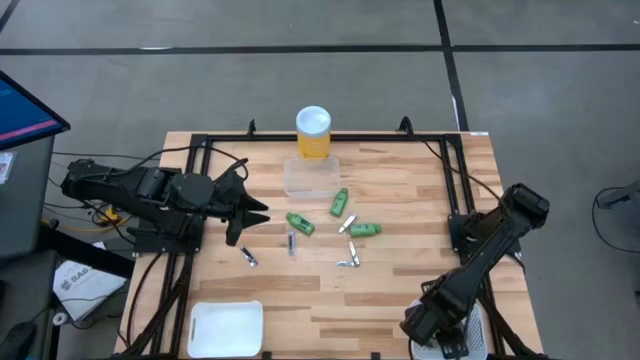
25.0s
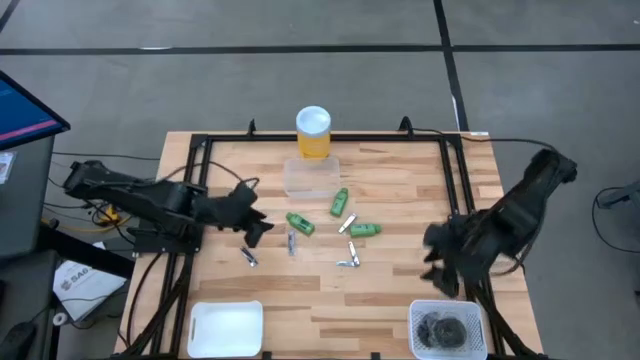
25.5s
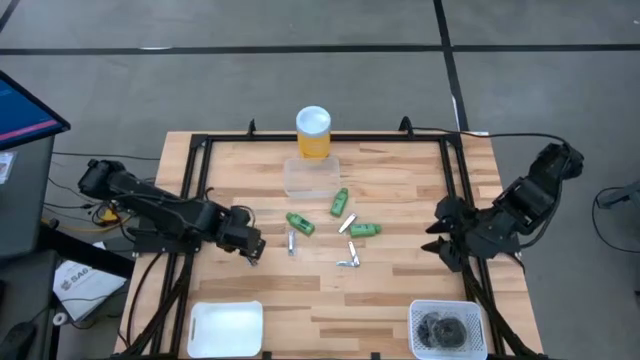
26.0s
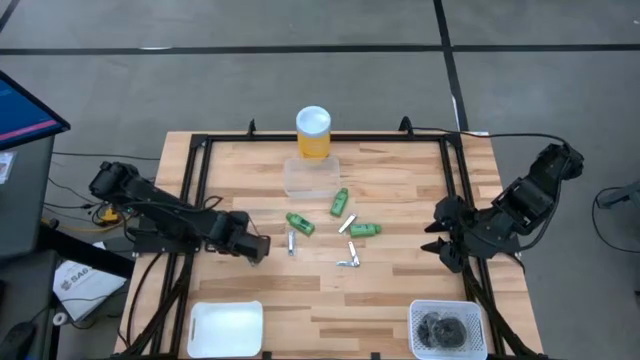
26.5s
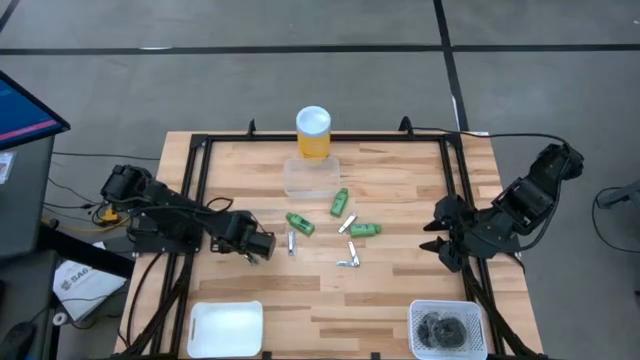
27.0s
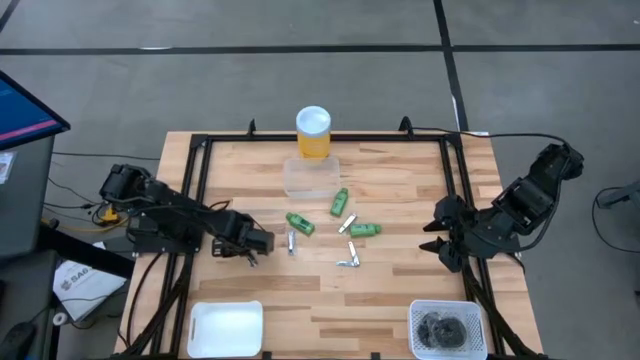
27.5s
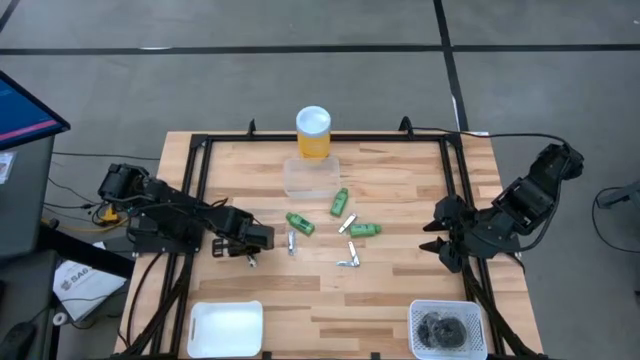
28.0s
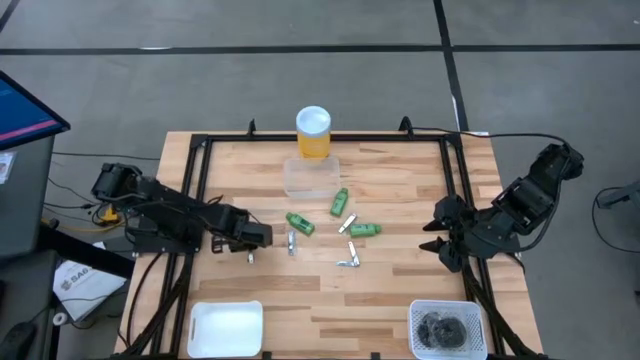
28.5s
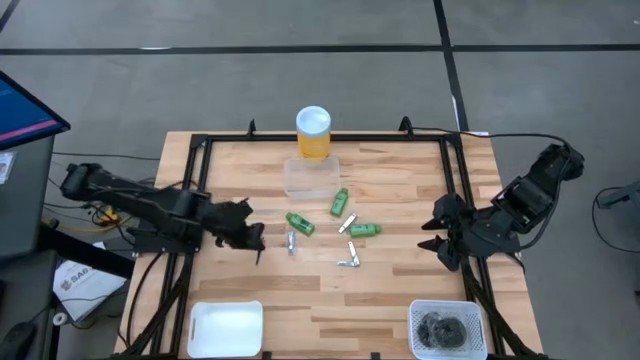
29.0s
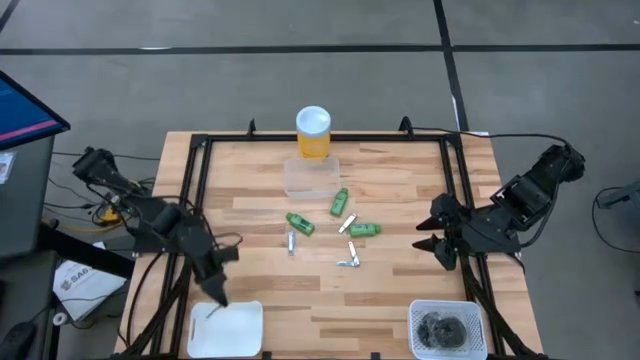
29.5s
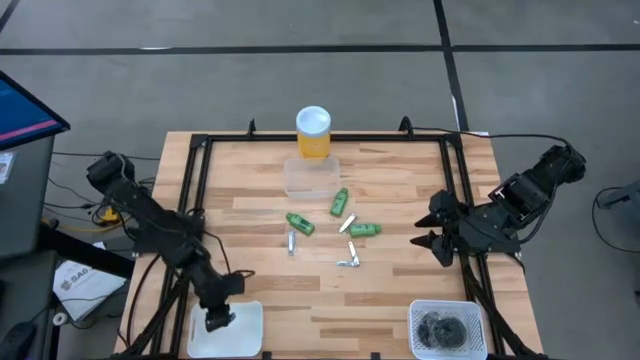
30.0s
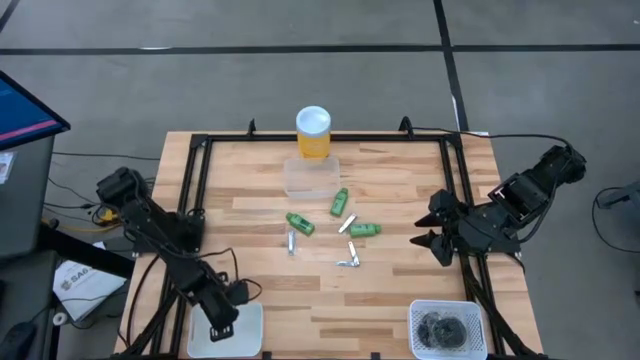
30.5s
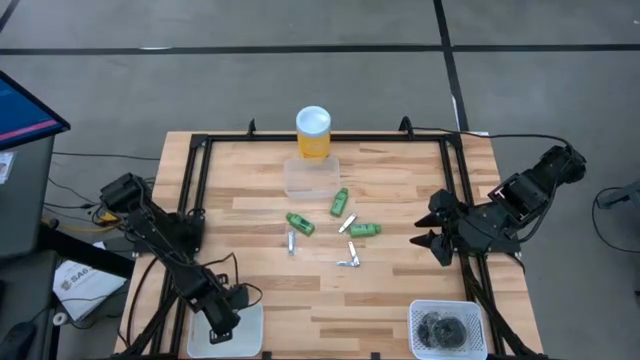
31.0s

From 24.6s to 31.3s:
Task: Pick & Place Travel size toiletries
Put the silver nail cutter into the left white bin

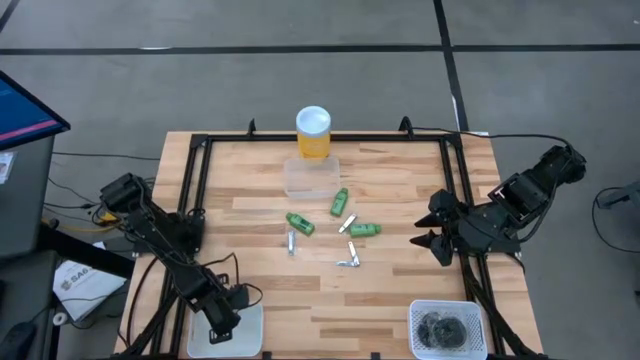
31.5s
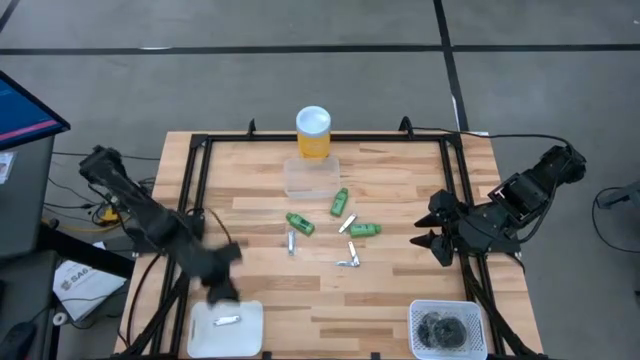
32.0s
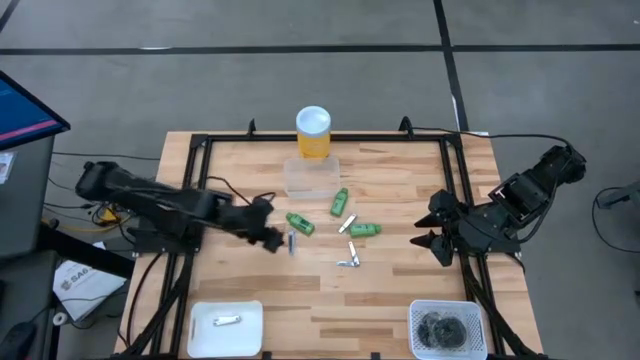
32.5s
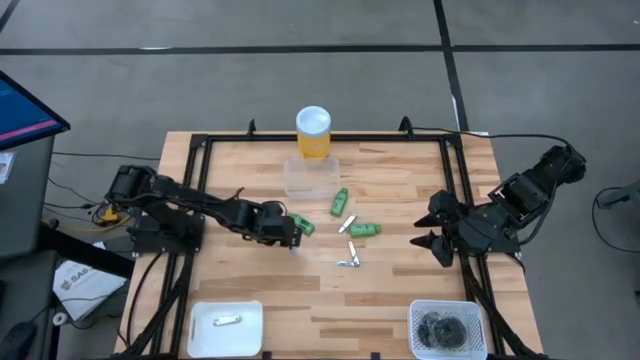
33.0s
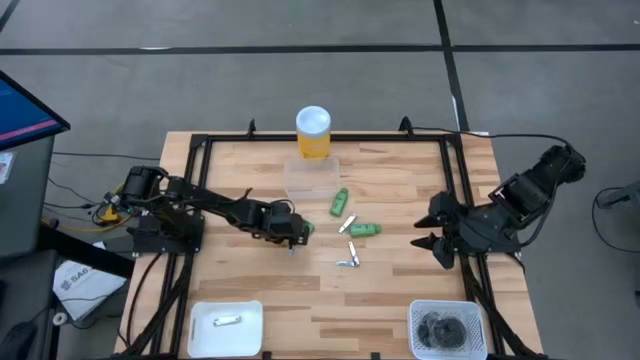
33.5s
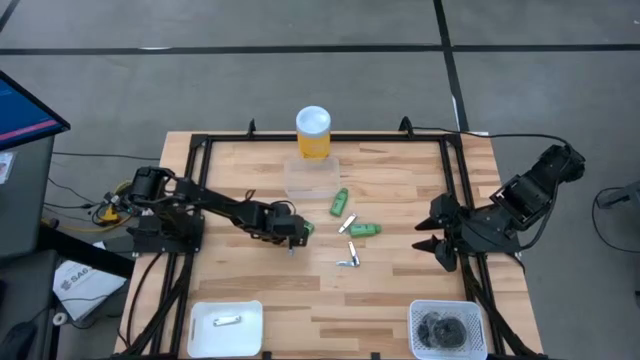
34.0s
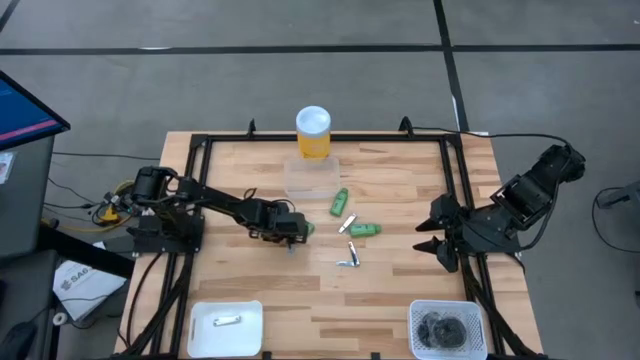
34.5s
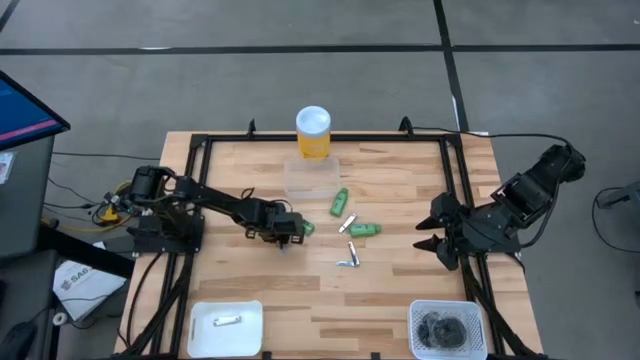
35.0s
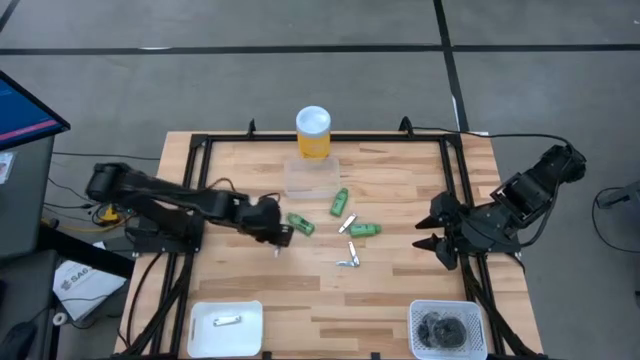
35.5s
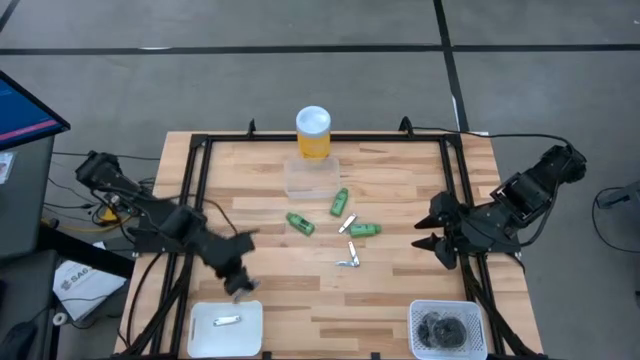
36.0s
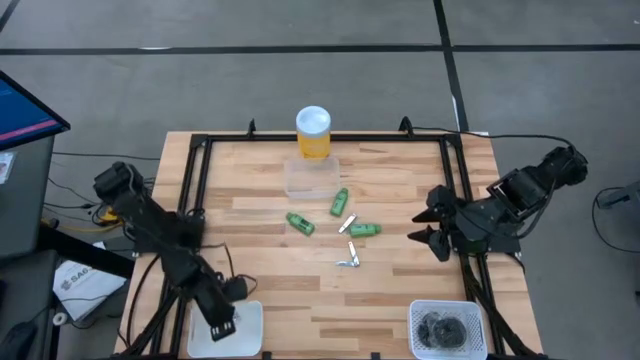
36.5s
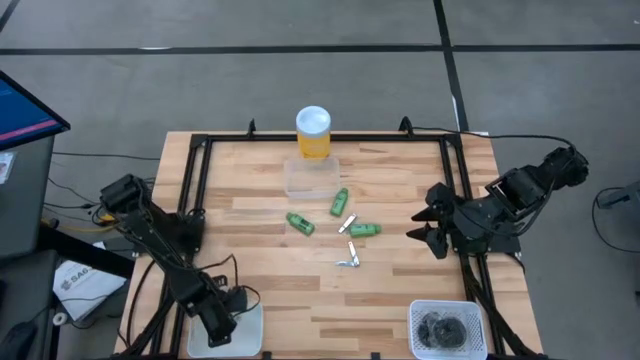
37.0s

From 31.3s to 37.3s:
Put the silver nail cutter into the left white bin

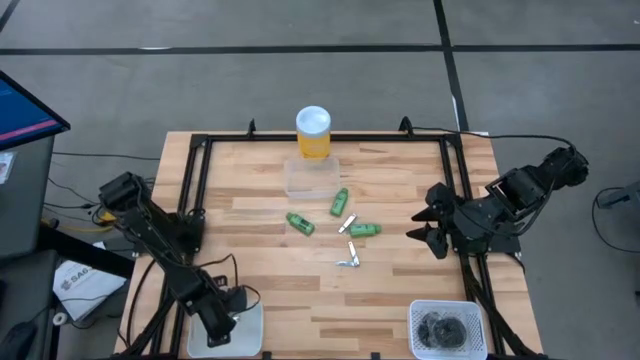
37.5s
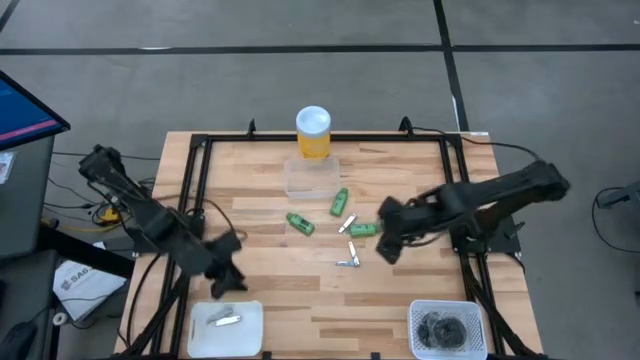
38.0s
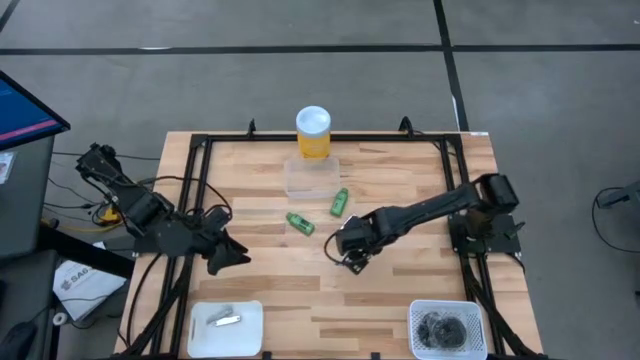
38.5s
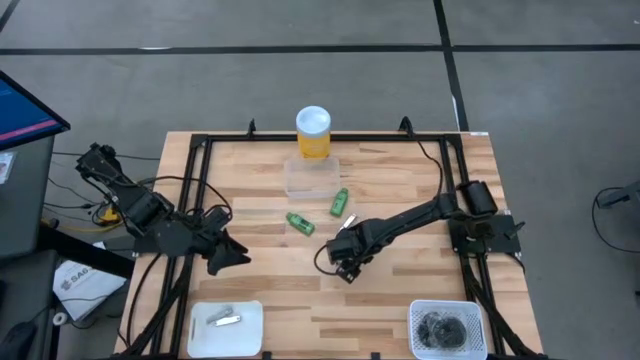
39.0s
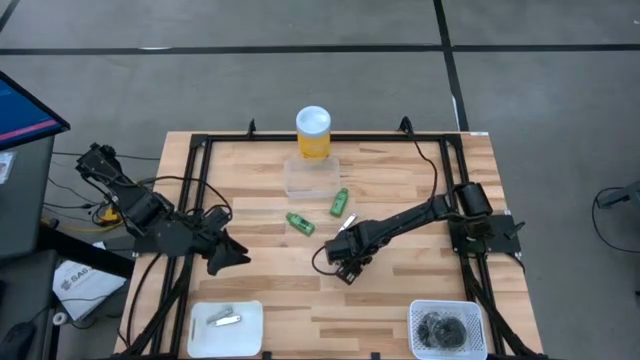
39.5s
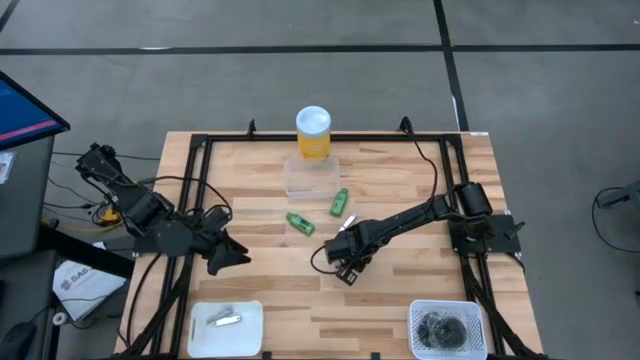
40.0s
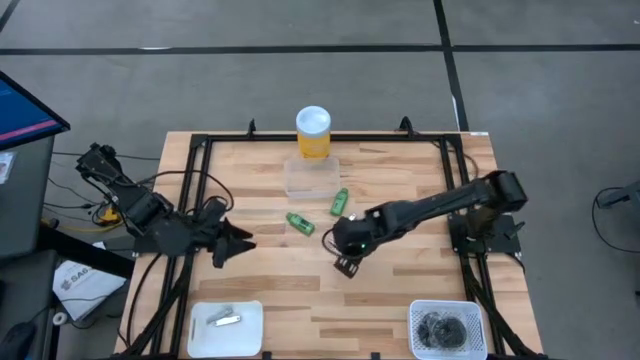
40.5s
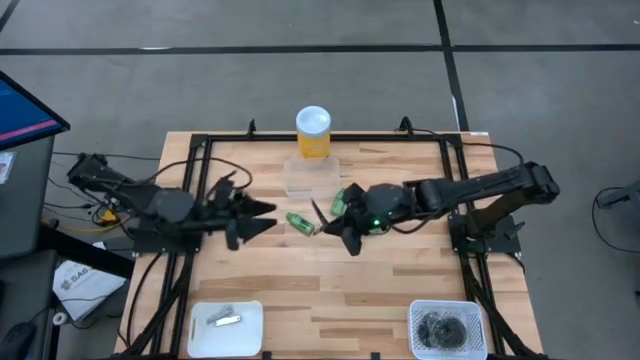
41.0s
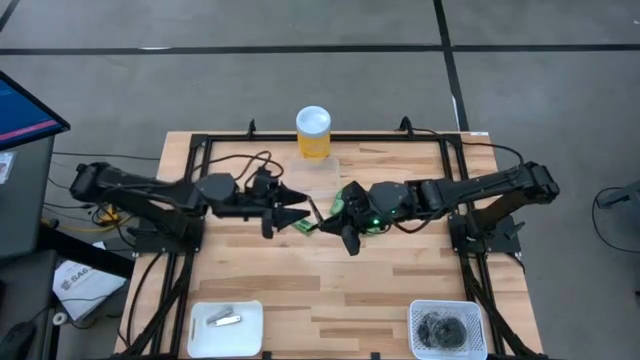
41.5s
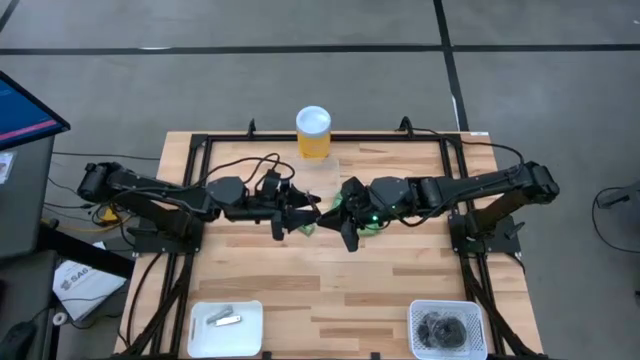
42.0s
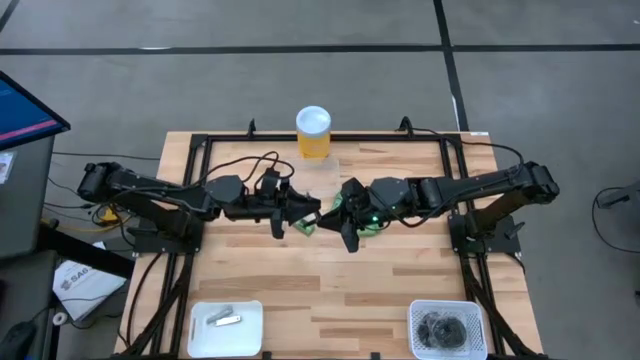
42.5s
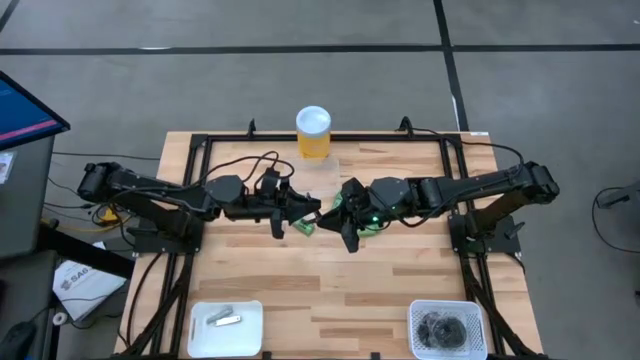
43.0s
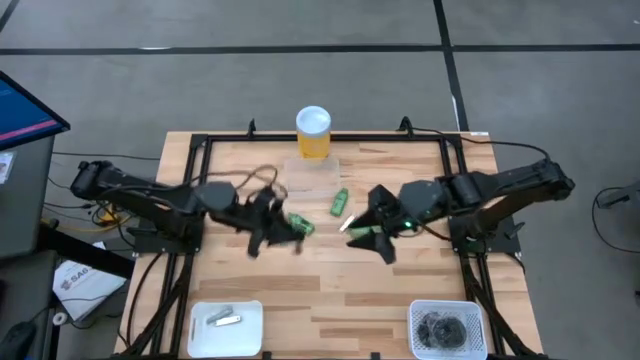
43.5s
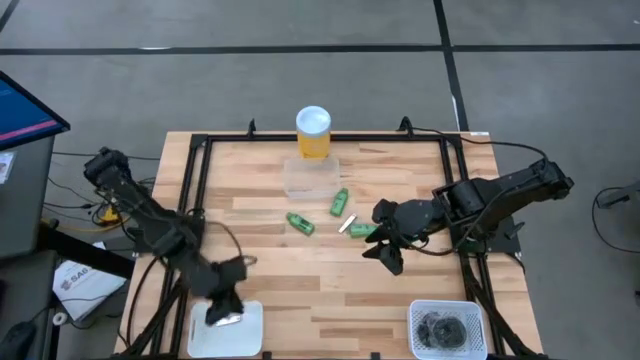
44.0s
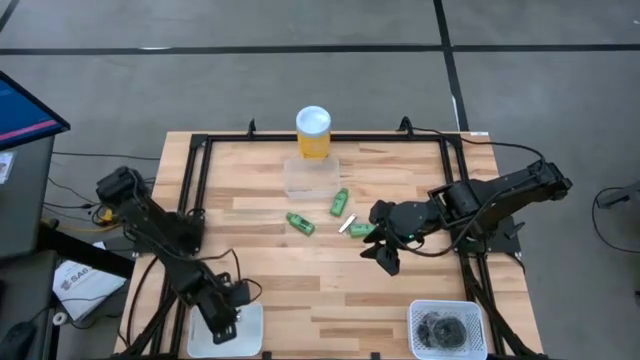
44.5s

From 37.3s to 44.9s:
Put the silver nail cutter into the left white bin

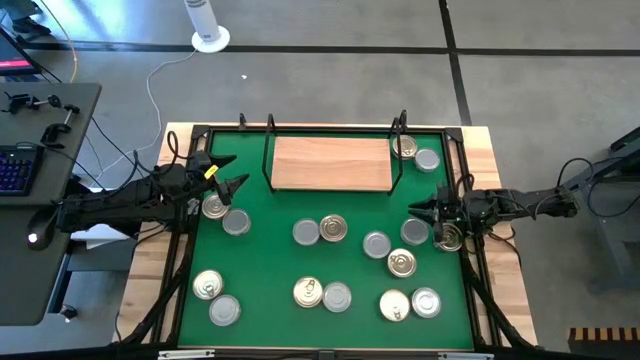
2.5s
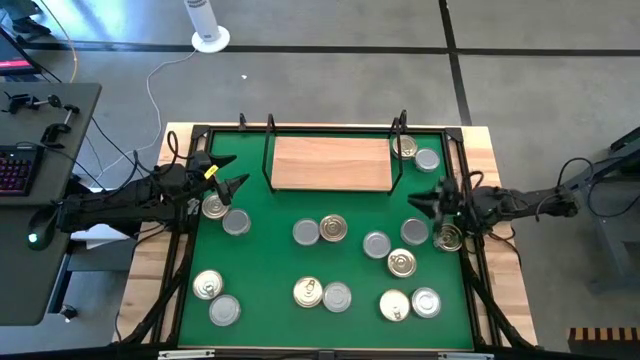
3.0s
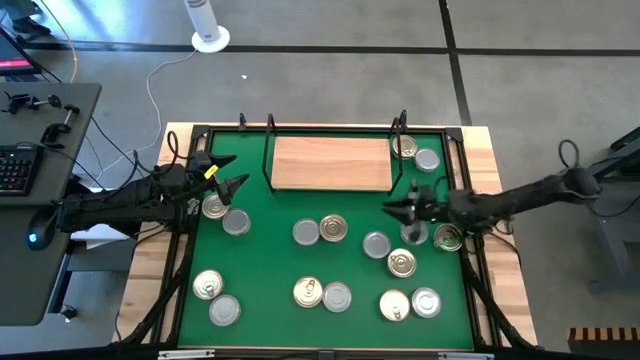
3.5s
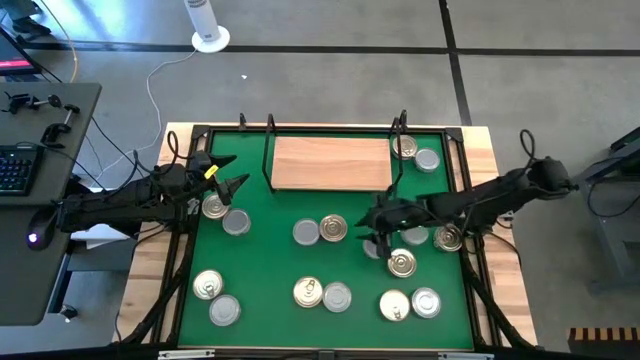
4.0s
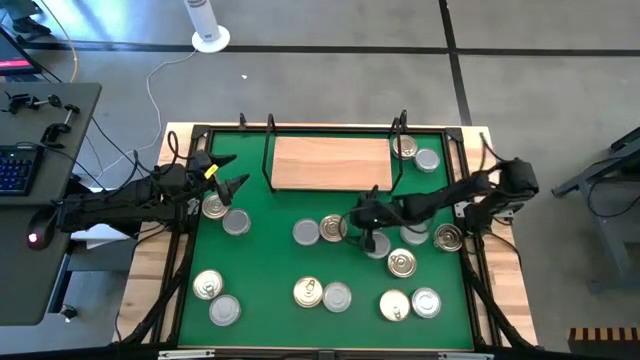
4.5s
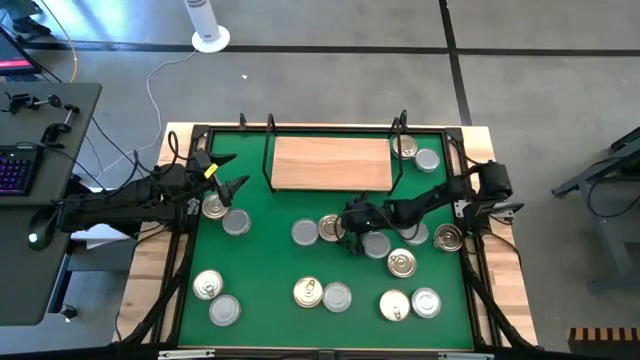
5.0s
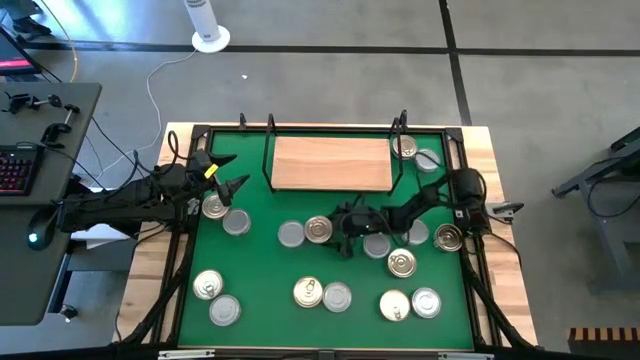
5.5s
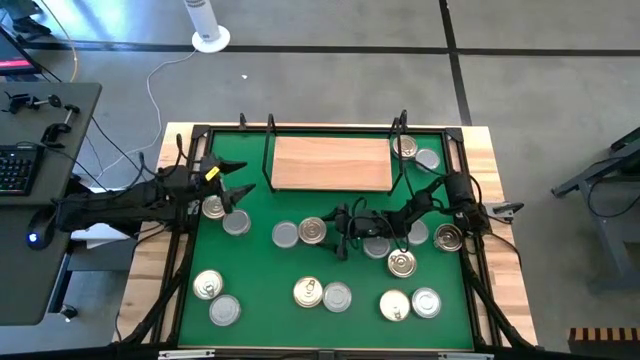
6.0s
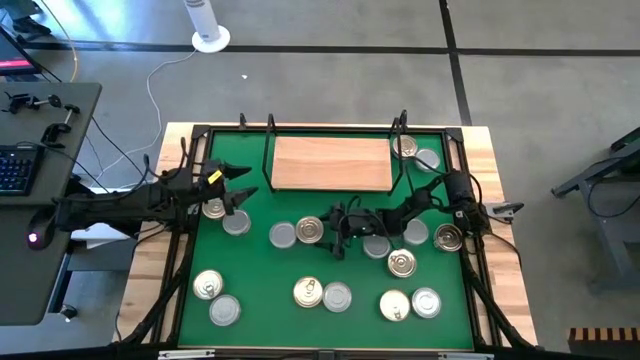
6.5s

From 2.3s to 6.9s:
Task: Stack canned seafood by type on shelf
Put the blue/pink tuna can on the shelf
